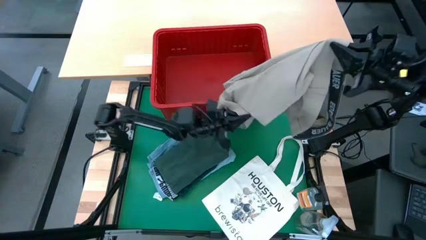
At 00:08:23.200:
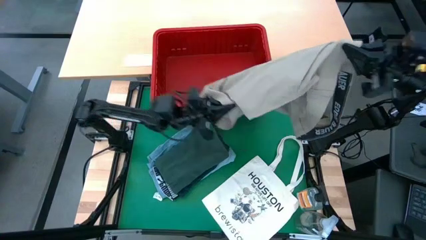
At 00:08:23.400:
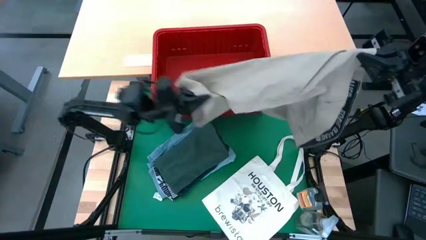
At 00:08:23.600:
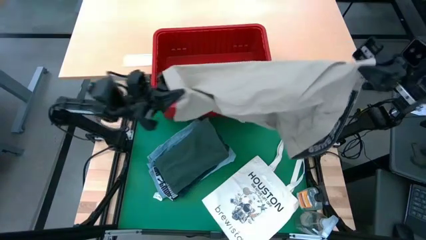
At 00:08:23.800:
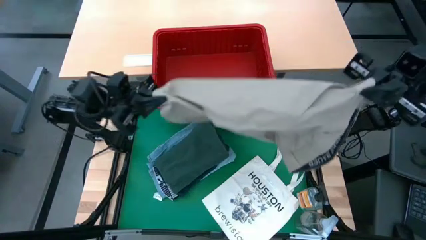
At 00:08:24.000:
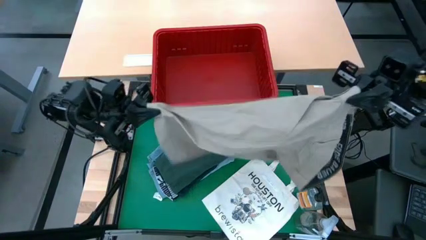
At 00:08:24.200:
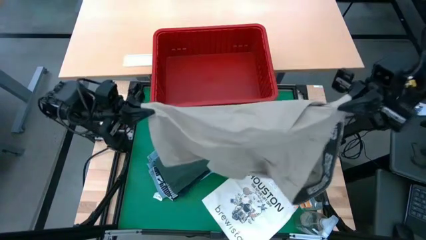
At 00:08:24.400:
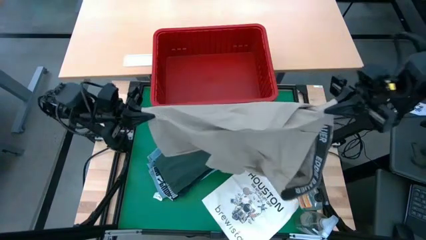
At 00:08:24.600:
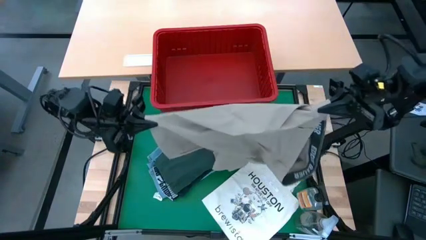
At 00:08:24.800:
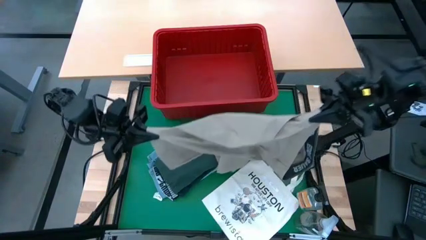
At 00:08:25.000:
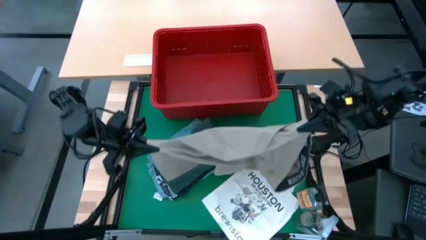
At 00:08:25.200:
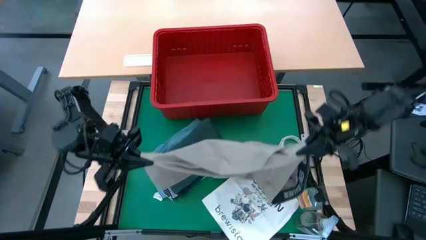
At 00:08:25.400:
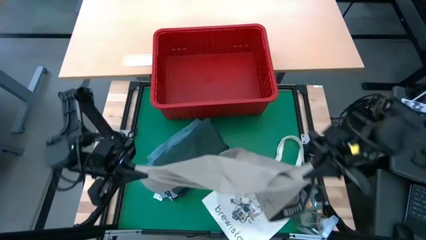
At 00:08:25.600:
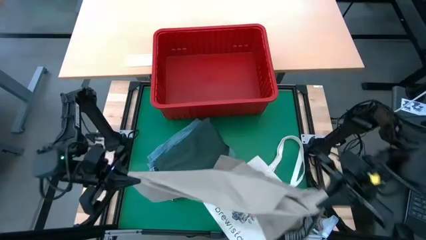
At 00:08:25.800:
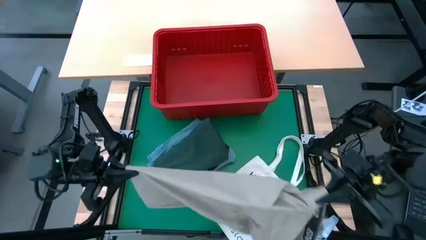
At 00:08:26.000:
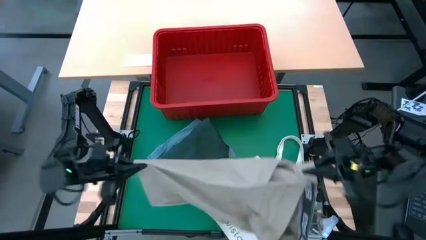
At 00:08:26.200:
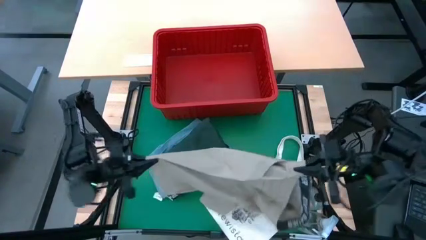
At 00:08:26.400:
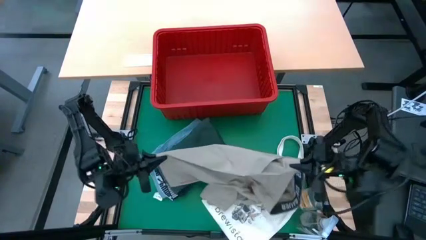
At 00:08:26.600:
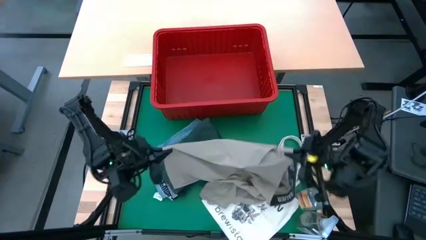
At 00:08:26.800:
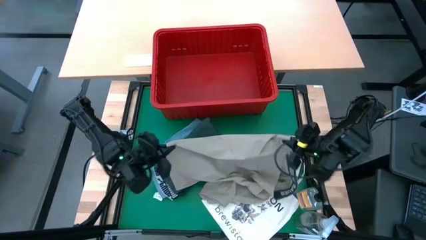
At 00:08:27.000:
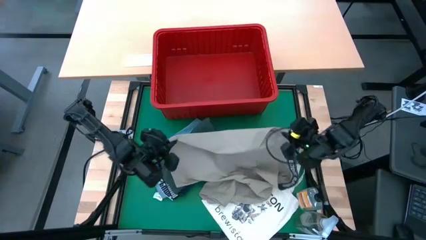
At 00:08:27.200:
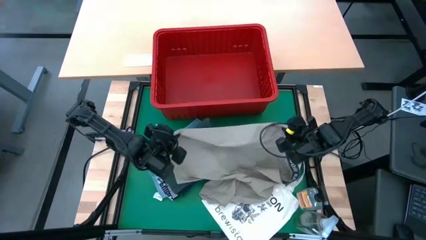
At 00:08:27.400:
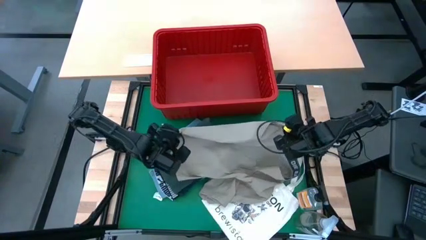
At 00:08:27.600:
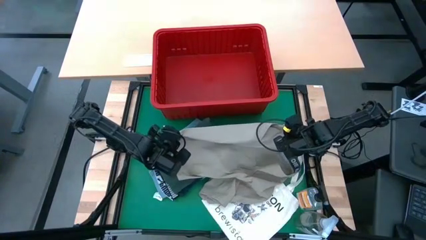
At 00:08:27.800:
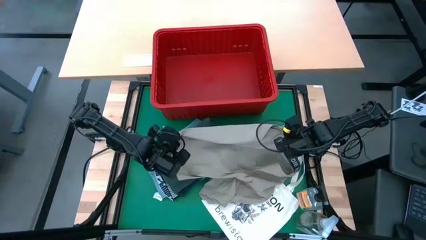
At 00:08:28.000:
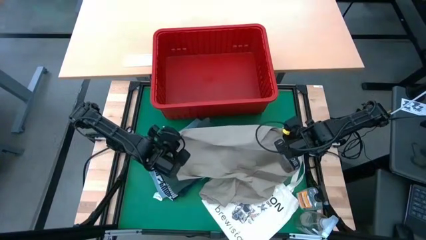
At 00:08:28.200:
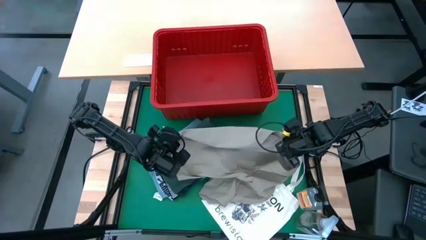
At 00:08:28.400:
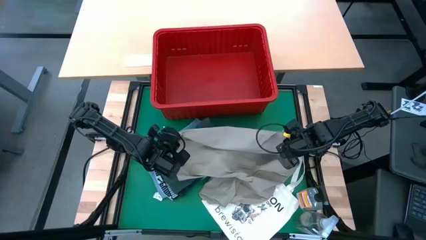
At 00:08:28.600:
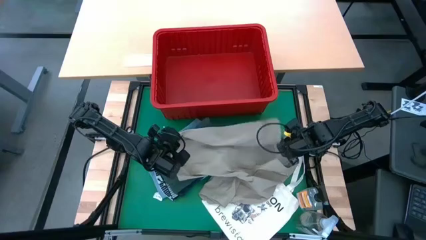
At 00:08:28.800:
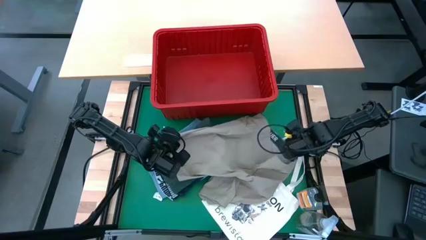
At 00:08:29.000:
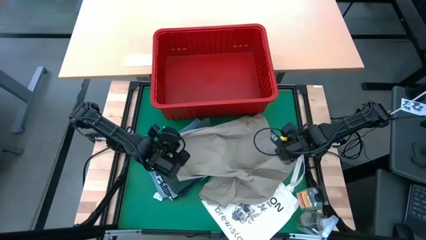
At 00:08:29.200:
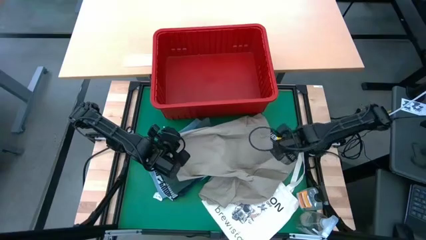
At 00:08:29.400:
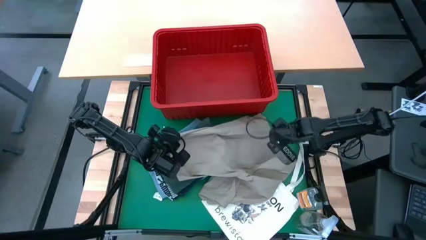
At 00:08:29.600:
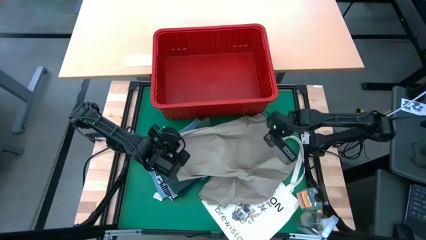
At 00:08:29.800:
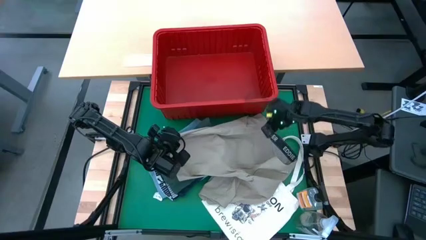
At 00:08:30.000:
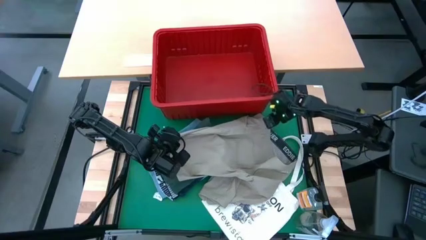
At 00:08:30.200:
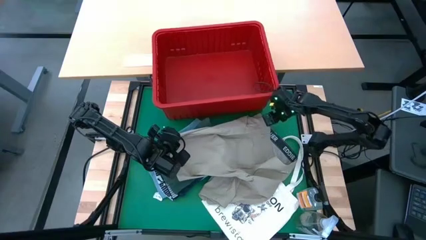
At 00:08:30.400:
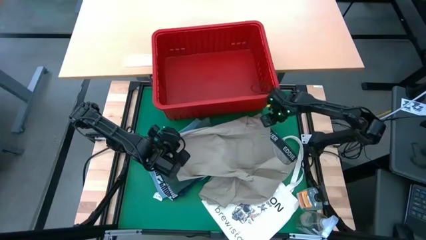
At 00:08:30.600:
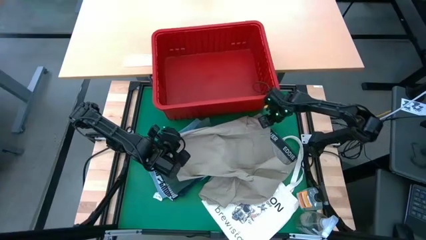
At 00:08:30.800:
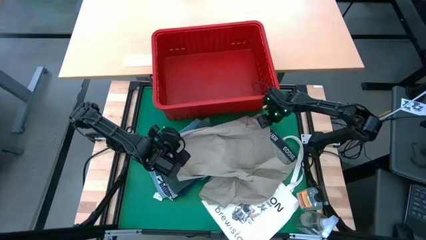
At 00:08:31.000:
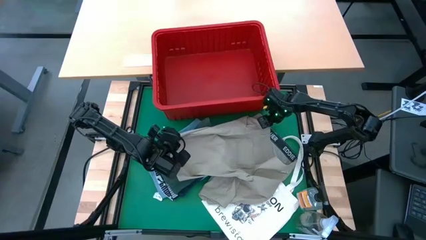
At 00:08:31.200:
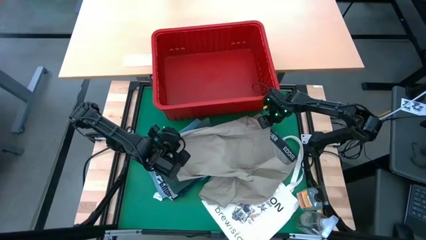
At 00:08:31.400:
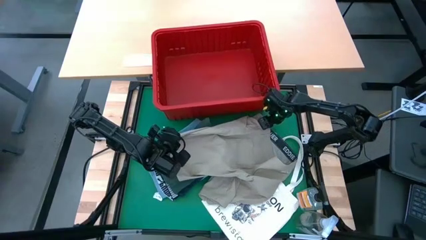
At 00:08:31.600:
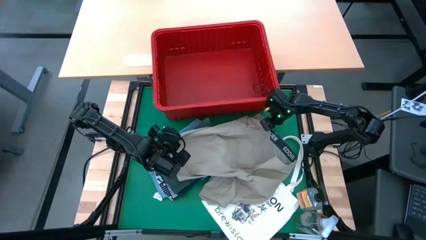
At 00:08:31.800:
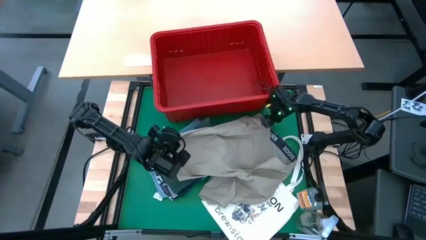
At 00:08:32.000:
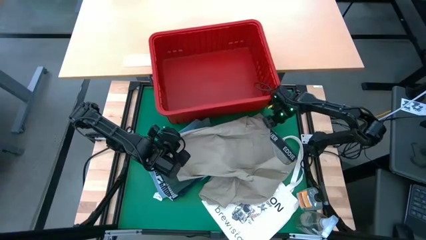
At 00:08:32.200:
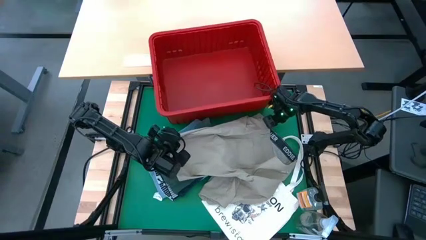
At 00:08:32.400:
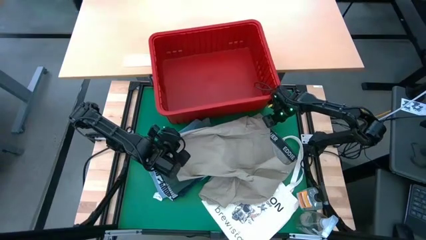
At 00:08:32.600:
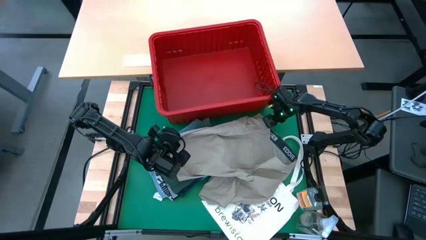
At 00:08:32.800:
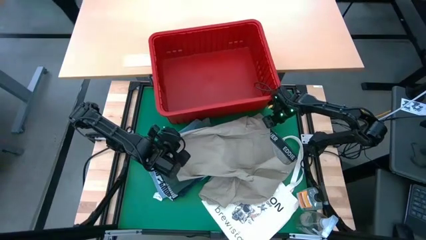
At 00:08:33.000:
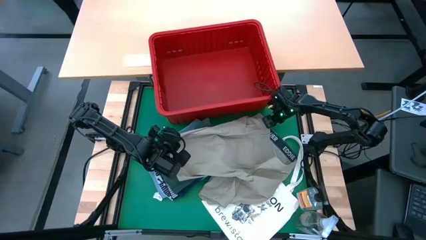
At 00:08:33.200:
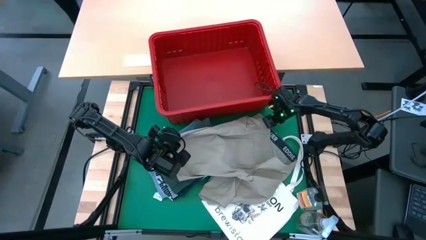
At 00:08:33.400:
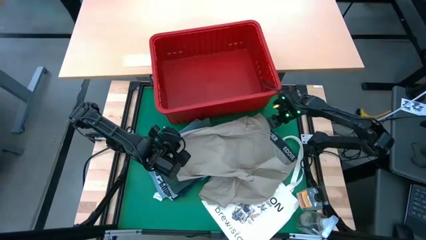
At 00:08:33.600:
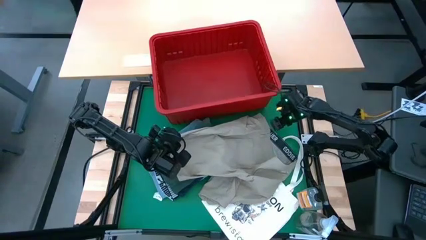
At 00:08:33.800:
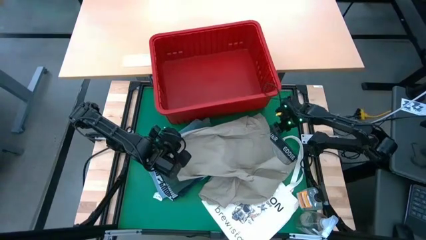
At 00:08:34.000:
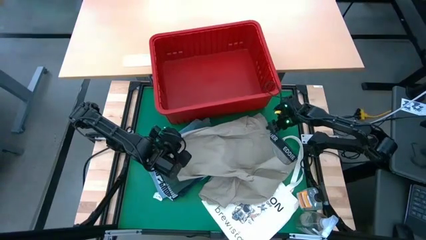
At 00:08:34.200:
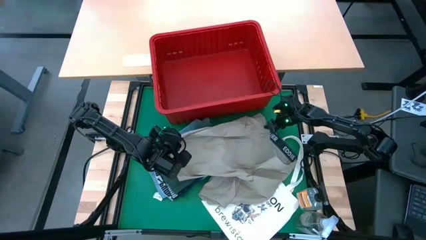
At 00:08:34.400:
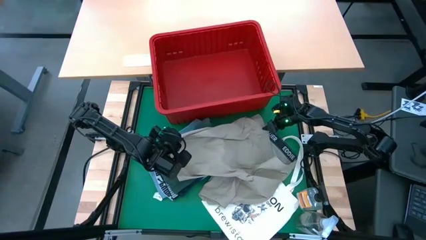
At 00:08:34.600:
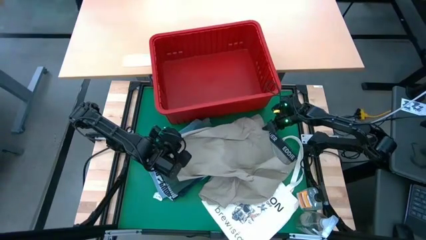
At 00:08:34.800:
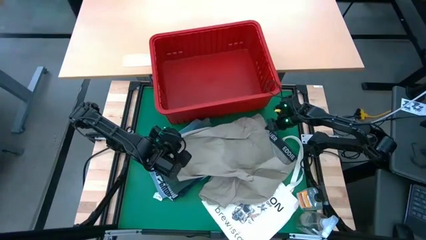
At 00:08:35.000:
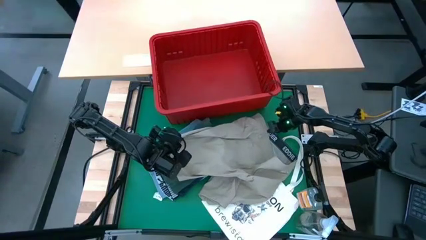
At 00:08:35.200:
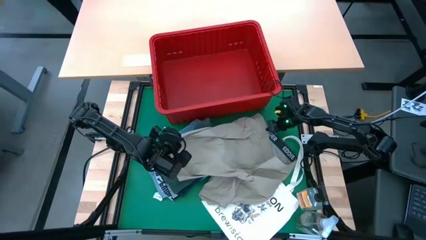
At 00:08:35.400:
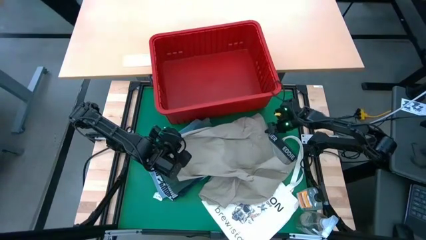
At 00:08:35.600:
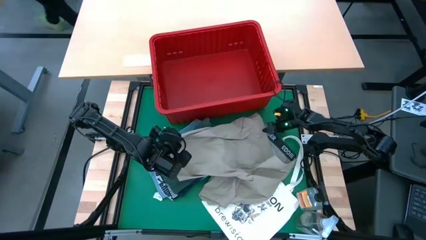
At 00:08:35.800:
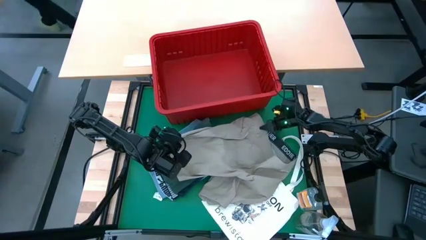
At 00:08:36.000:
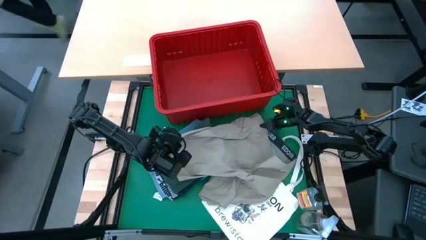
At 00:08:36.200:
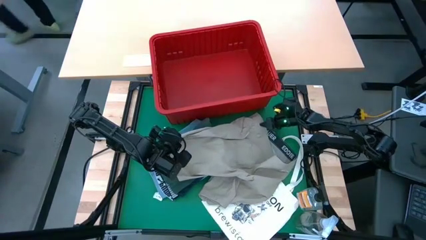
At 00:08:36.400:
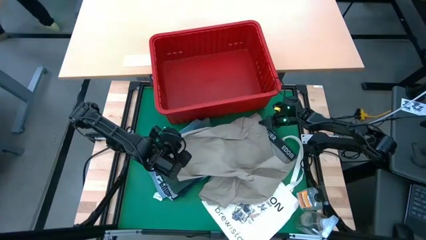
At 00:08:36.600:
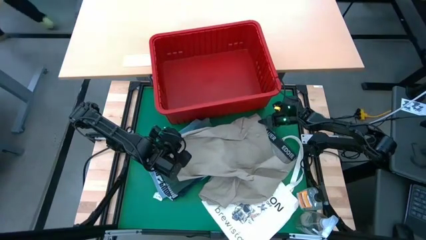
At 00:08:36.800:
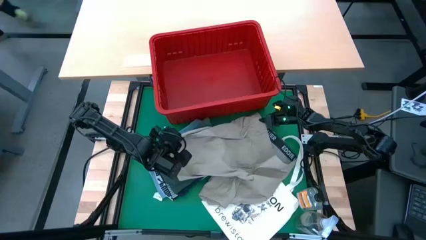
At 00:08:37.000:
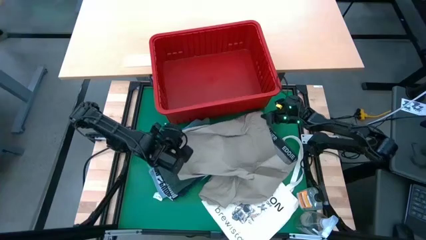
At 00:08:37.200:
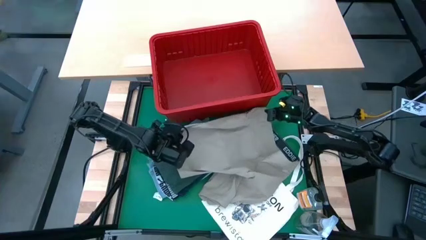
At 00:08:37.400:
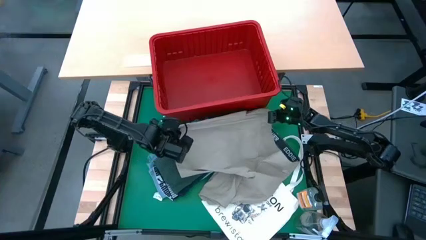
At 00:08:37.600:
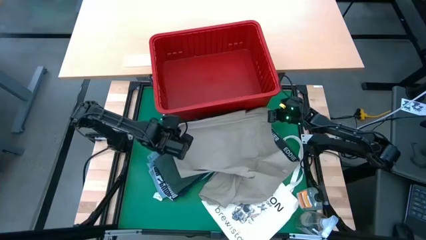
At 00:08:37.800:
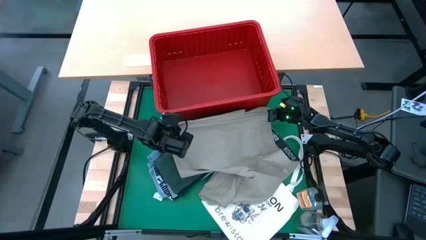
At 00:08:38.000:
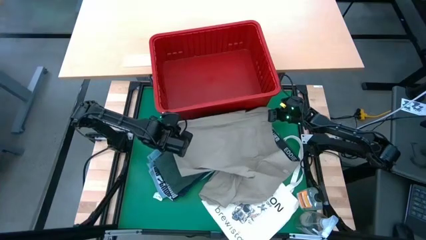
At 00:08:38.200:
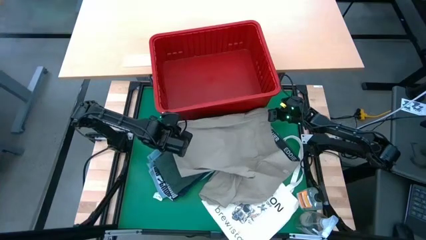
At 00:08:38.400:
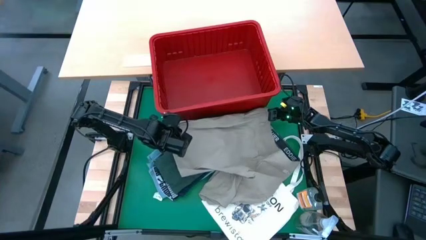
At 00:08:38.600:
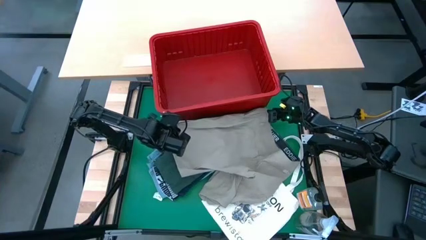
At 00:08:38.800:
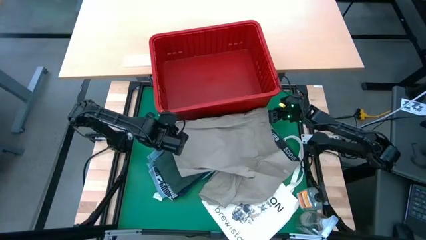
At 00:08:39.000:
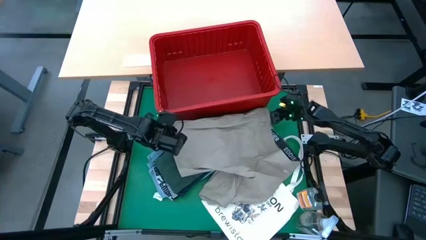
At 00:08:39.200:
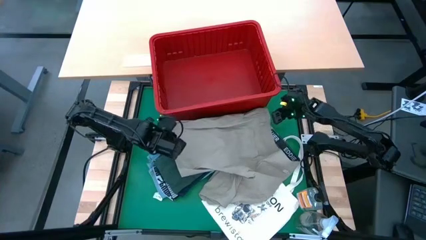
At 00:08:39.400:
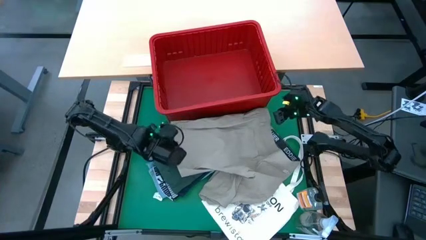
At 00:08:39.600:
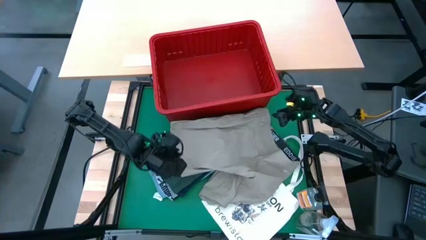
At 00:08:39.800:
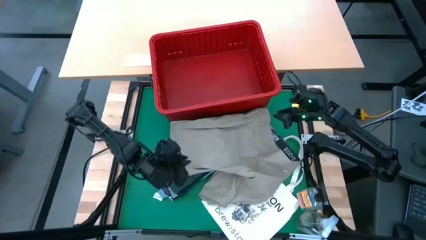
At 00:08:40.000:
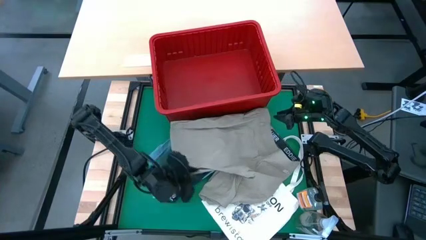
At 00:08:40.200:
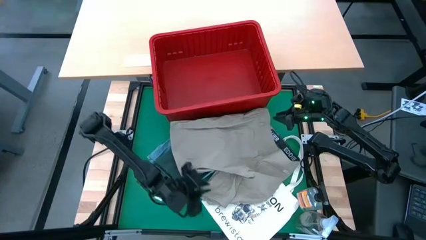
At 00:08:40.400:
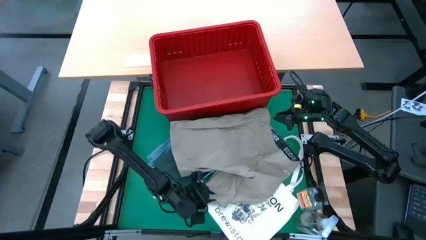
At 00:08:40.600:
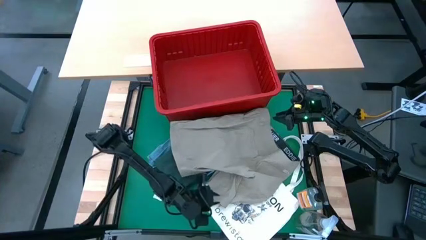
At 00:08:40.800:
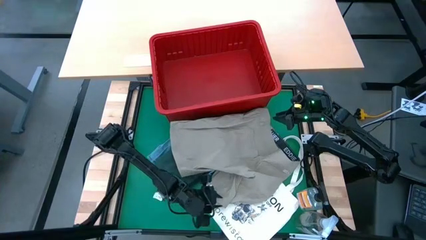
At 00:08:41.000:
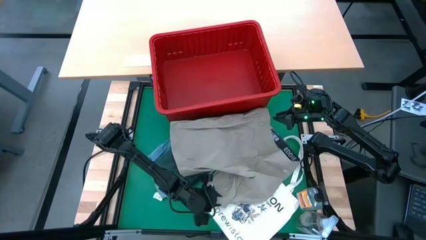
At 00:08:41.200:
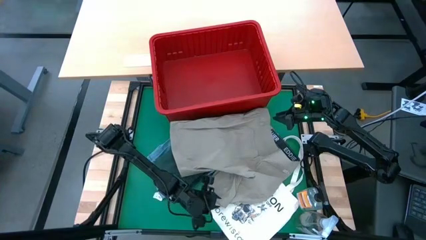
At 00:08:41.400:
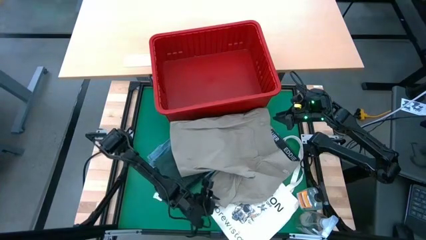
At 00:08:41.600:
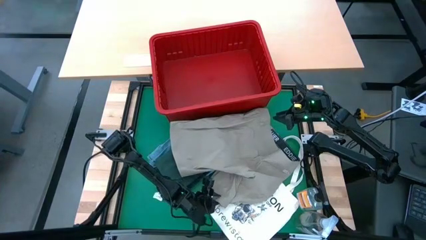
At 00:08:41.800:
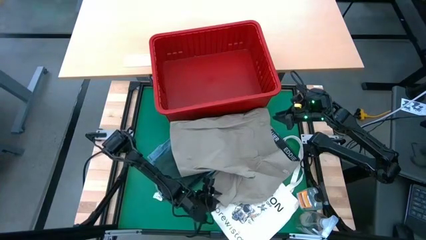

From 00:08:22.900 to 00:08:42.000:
Task: Fold Laundry from Bin
Fold the light brown shorts
